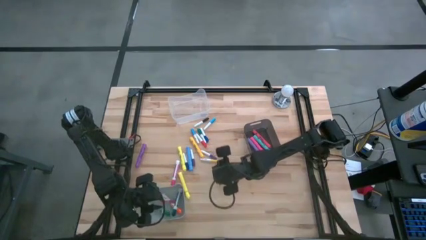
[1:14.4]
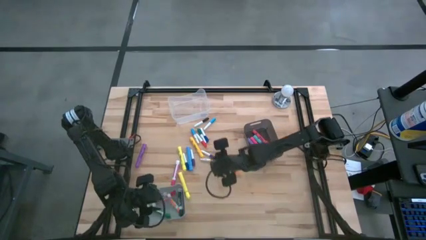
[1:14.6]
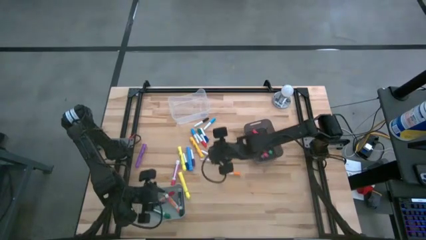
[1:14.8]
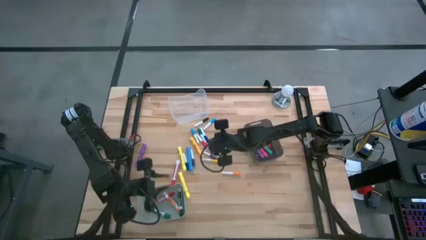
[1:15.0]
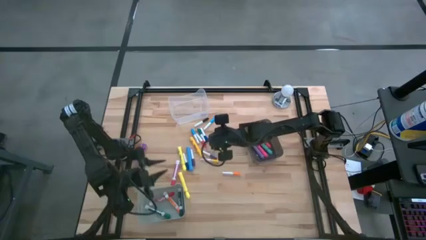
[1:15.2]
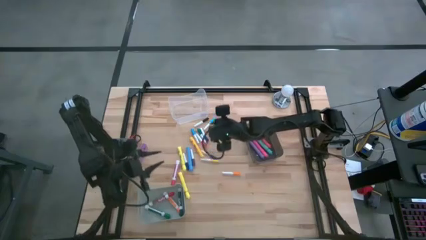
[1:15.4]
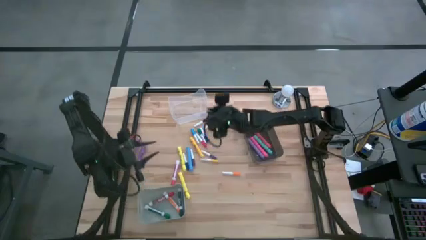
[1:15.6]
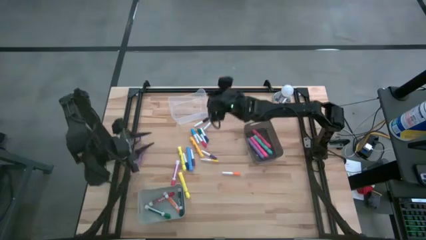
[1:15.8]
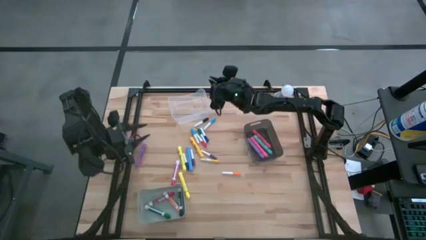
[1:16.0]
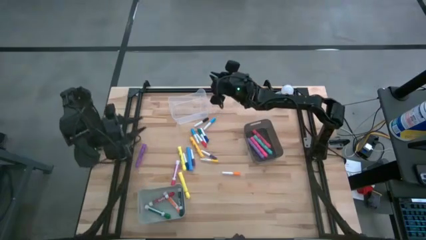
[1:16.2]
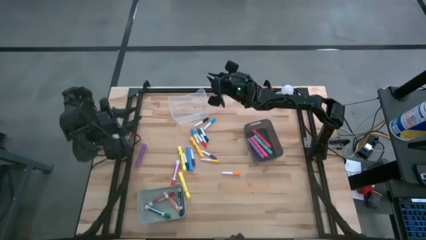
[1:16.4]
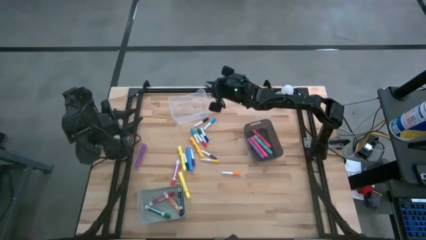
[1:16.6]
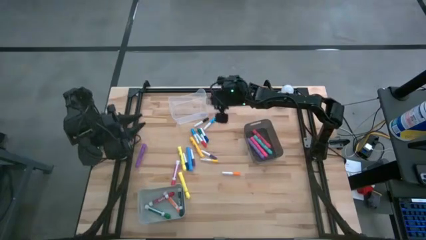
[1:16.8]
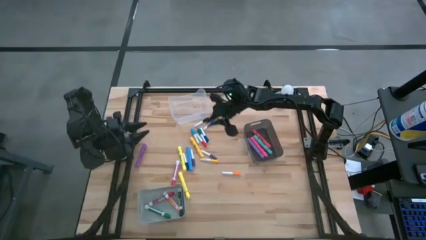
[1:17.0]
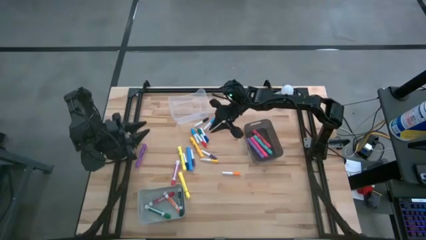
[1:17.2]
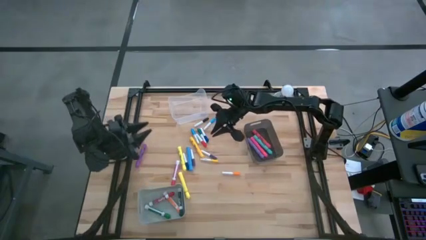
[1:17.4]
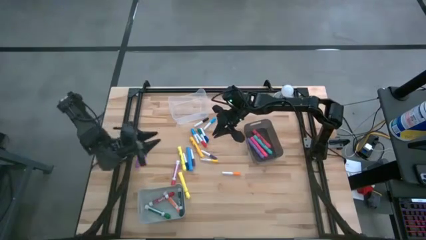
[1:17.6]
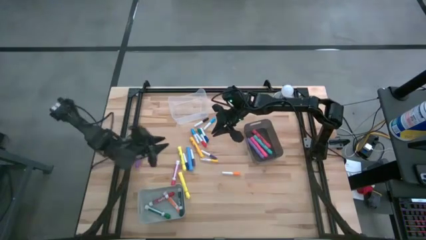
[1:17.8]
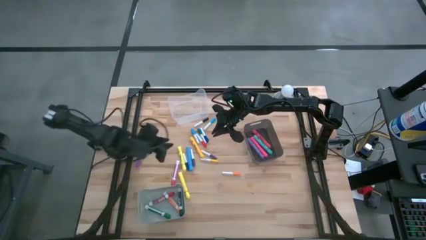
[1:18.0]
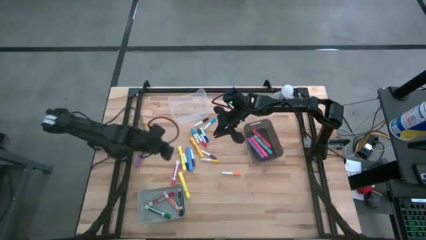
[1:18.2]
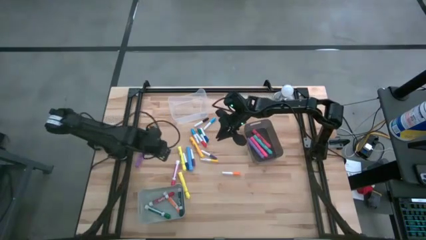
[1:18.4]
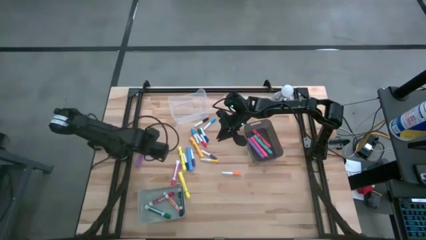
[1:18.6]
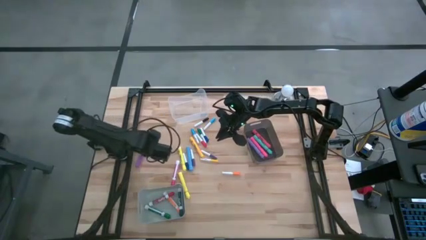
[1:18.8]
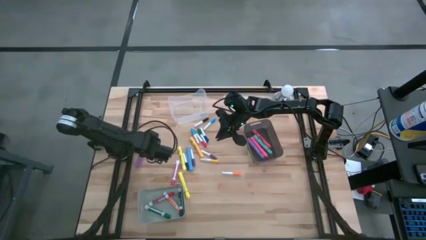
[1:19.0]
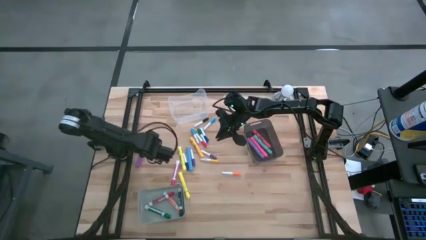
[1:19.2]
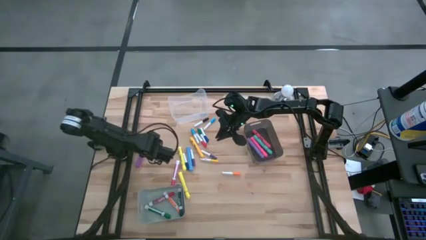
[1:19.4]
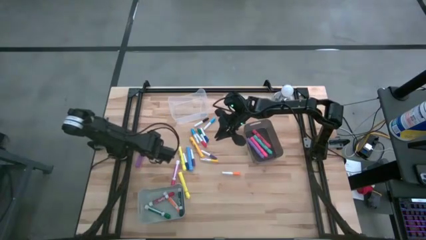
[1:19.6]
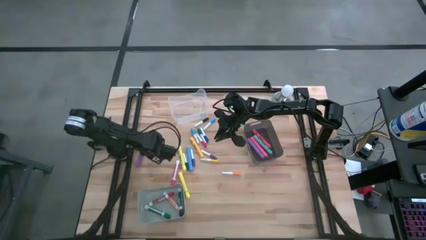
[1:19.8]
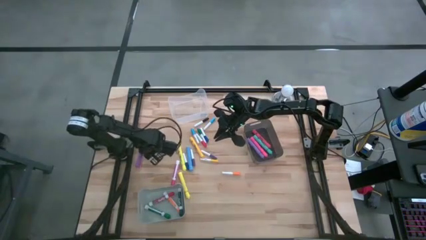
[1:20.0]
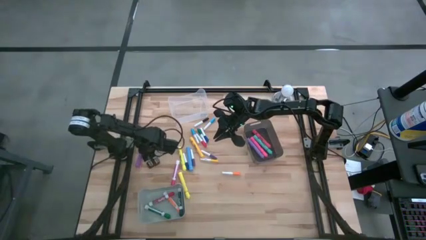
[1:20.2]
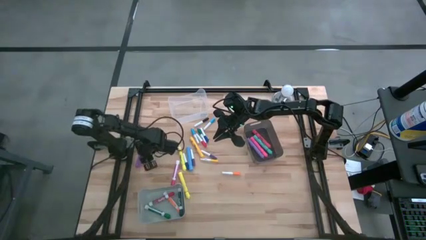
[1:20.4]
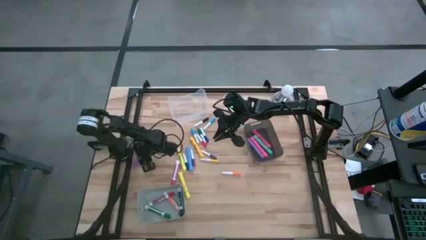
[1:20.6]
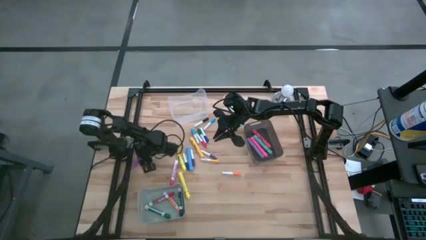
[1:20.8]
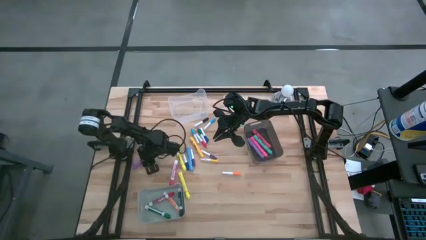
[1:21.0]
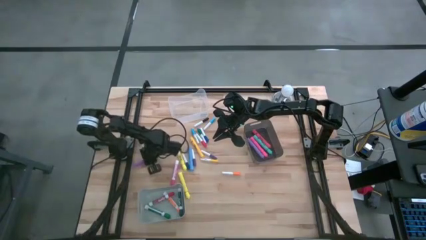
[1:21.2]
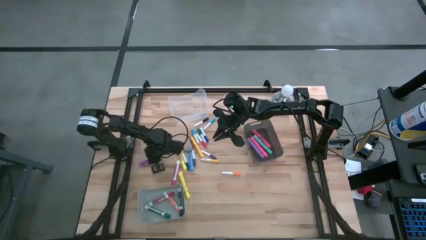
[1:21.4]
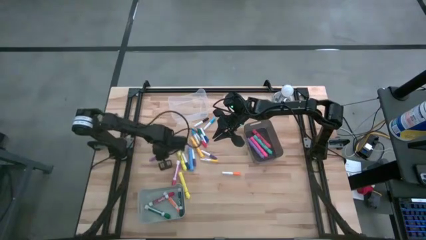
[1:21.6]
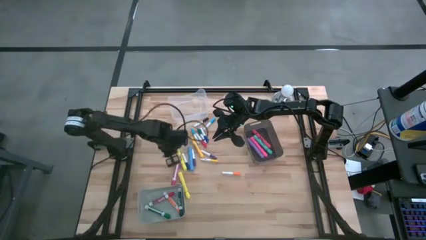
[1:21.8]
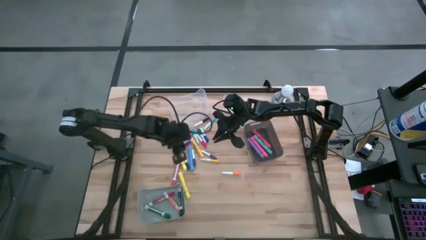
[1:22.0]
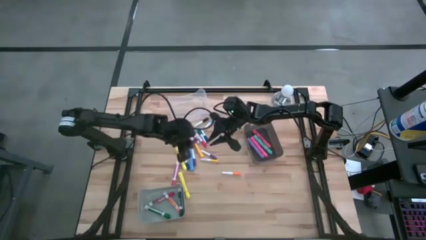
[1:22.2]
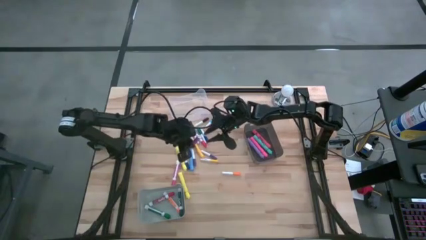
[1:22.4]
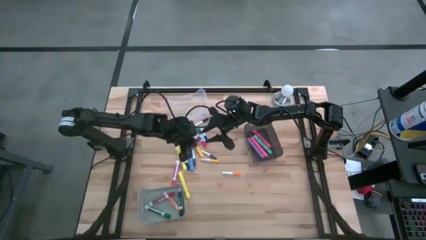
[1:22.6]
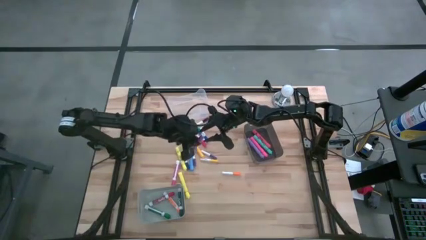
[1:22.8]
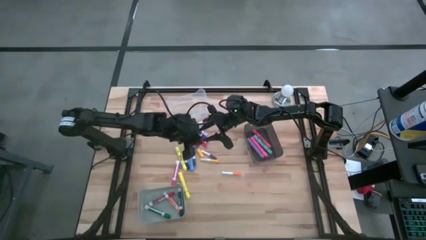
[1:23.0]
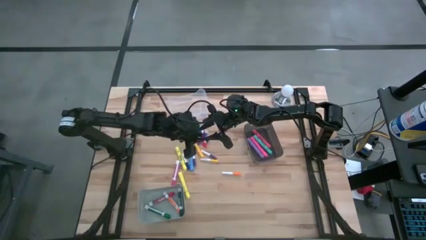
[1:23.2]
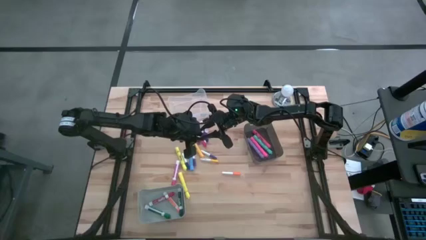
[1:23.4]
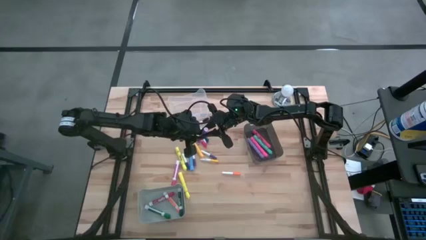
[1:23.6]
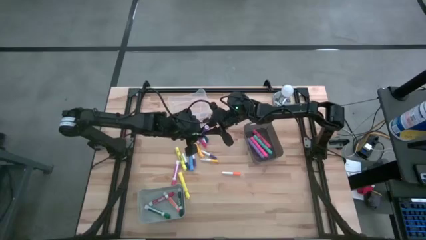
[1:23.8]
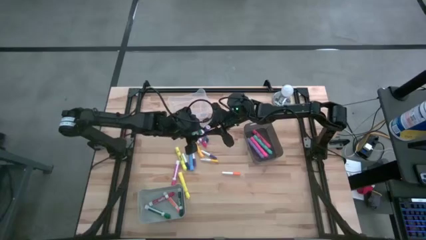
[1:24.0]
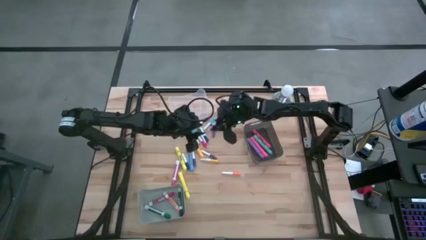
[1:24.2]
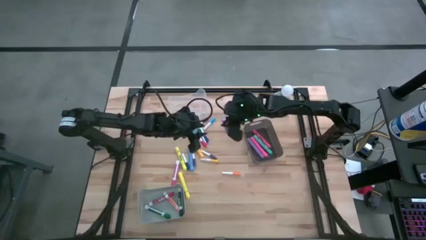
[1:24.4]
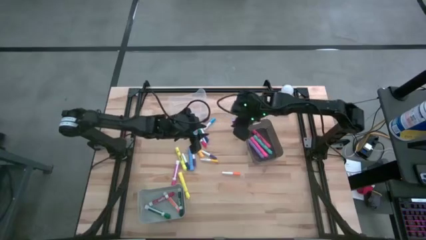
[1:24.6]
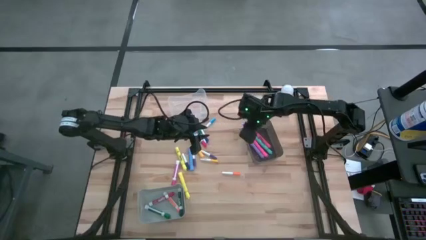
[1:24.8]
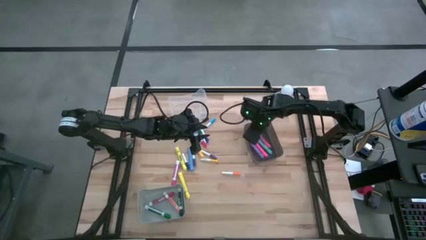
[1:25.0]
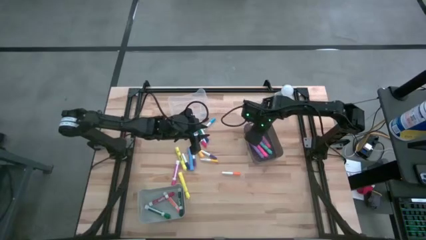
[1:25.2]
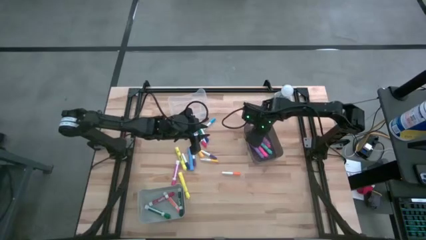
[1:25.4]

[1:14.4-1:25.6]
Task: Pick & Place Markers
Put the purple highlighter pen into the black bin

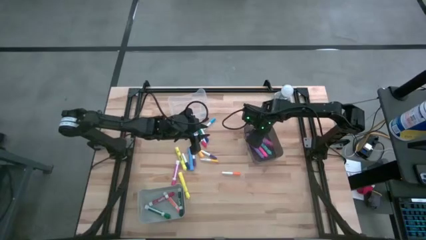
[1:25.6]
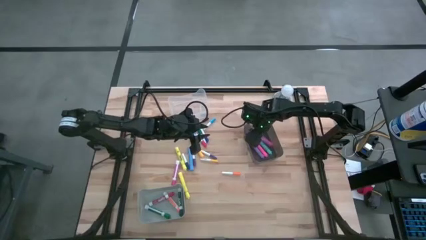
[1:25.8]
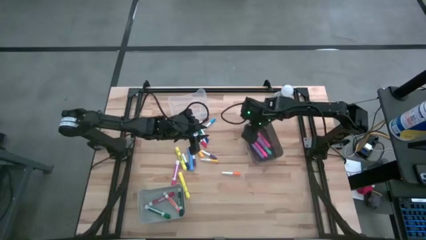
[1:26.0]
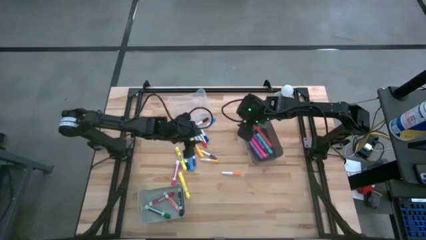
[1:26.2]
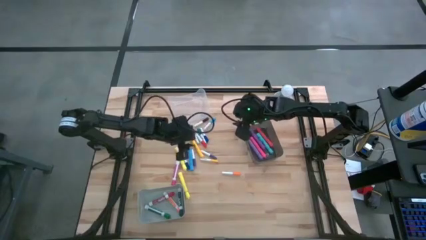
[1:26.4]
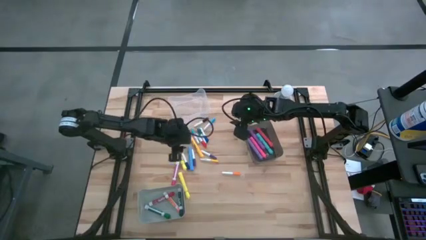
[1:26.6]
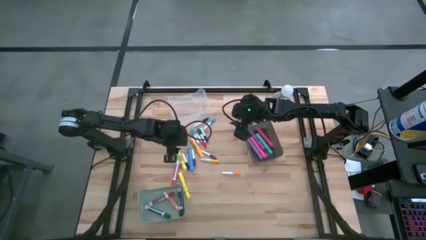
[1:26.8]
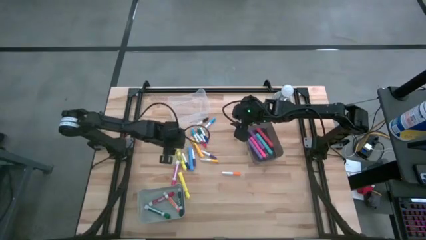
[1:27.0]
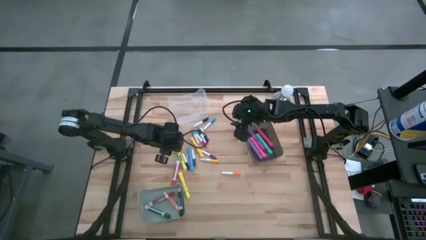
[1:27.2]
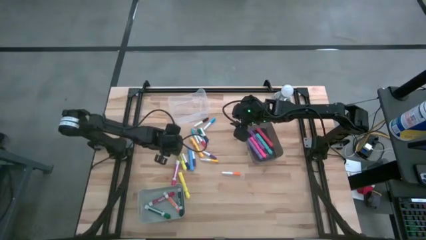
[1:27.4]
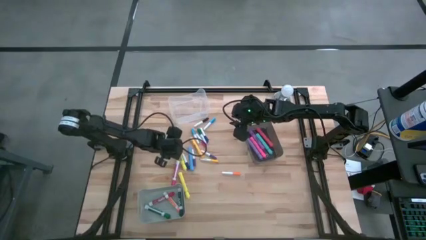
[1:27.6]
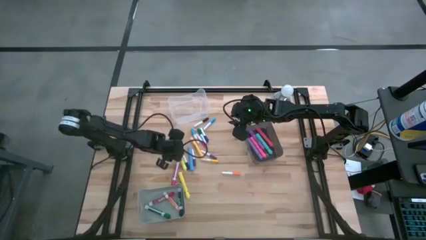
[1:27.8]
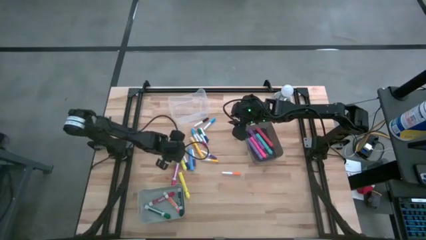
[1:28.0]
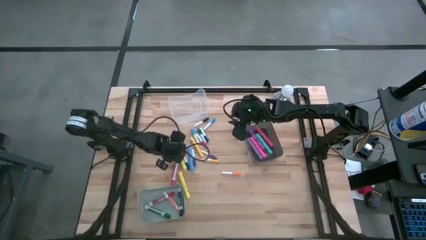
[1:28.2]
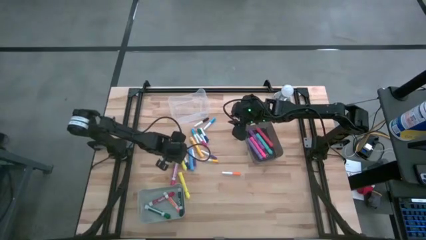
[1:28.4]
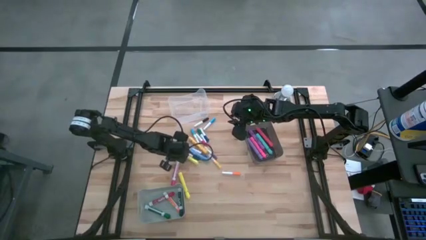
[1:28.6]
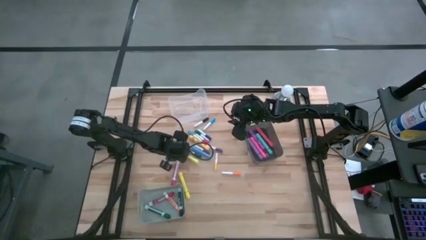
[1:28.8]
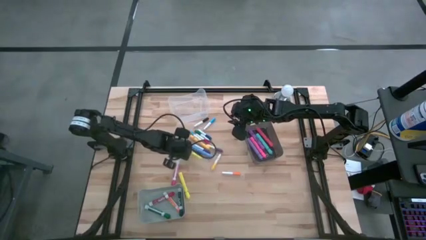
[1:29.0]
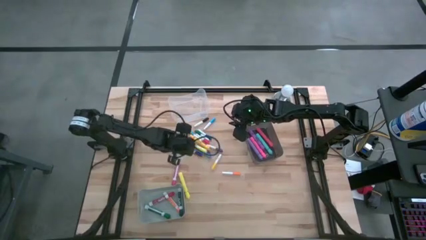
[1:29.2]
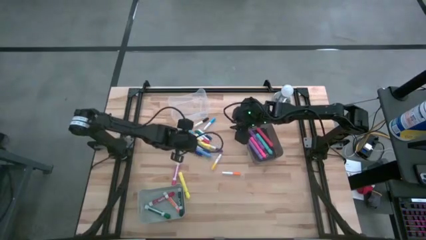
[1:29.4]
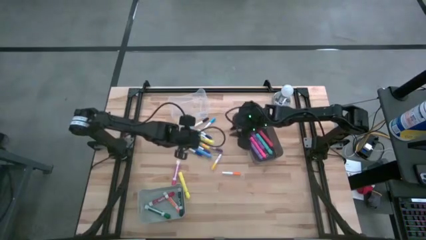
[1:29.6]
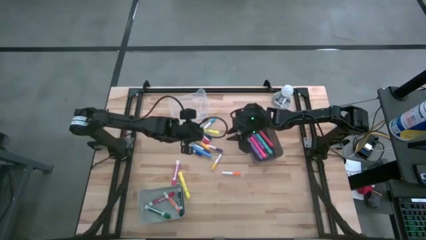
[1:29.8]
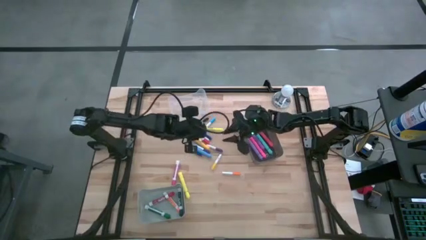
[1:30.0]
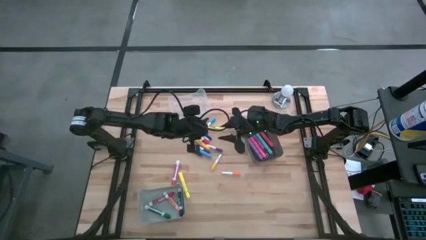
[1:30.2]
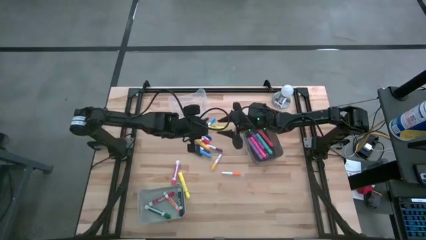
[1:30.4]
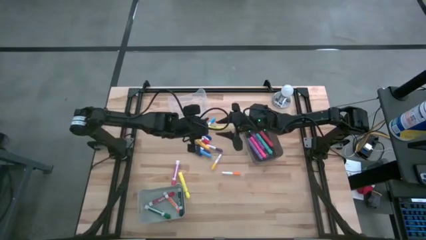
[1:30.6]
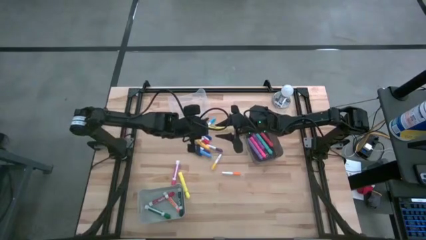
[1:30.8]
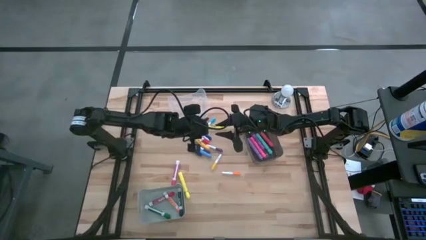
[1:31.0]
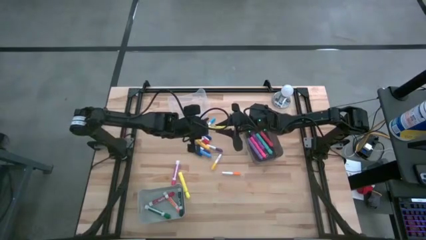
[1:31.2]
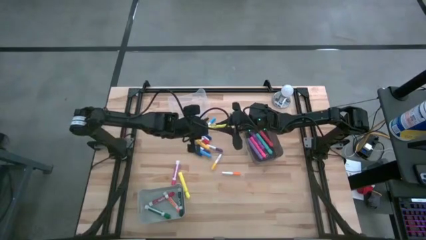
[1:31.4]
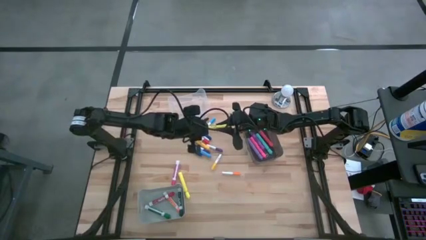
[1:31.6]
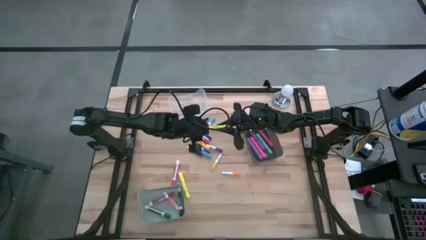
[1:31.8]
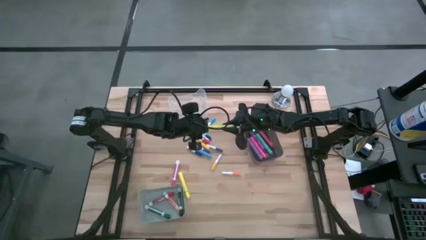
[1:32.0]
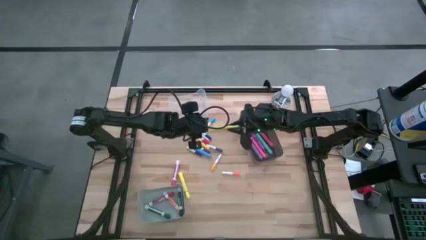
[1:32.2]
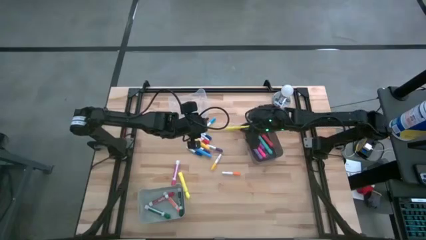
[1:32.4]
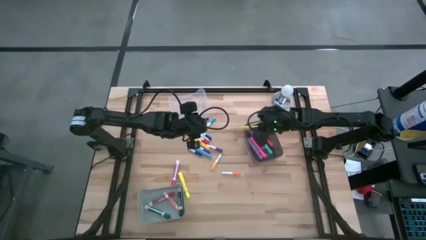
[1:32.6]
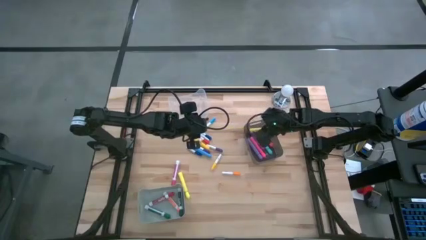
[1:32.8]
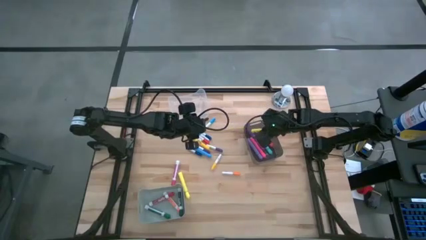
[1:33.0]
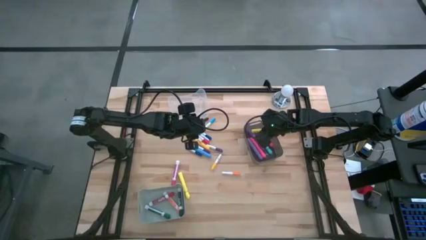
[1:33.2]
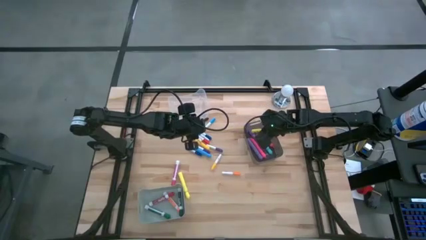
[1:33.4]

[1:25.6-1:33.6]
Put the top yellow highlighter pen into the black bin
